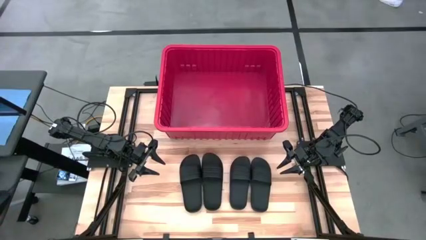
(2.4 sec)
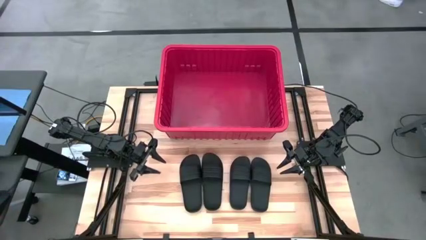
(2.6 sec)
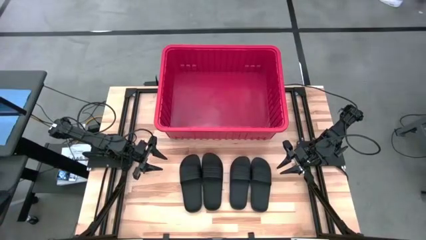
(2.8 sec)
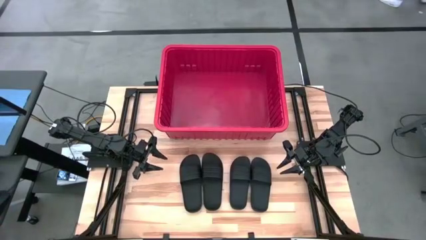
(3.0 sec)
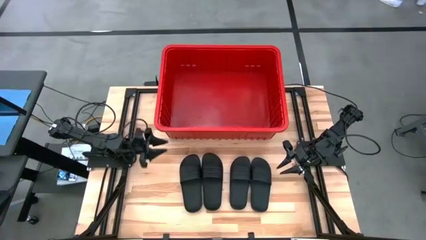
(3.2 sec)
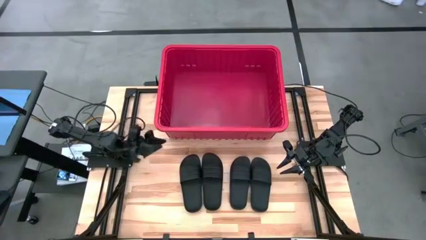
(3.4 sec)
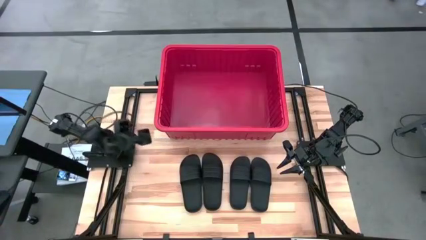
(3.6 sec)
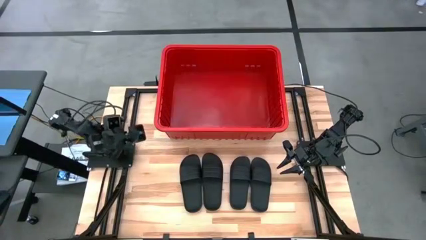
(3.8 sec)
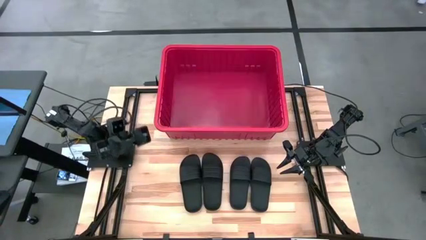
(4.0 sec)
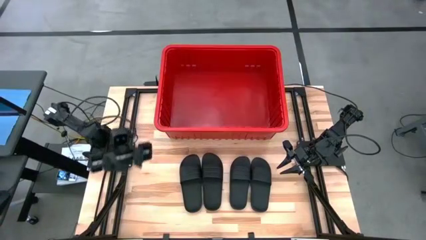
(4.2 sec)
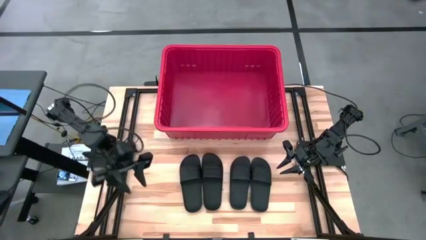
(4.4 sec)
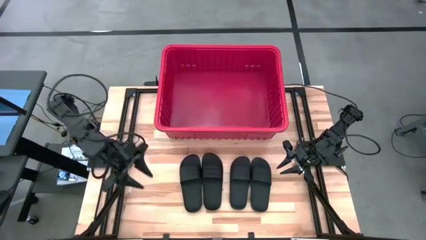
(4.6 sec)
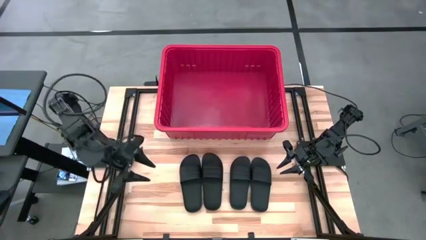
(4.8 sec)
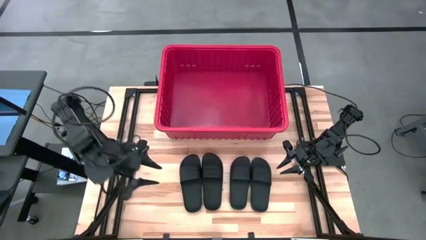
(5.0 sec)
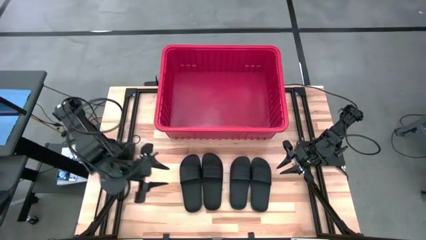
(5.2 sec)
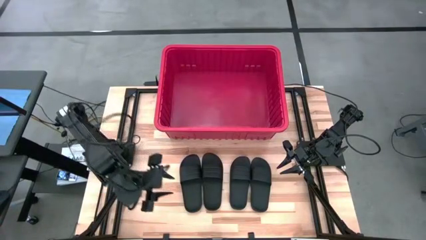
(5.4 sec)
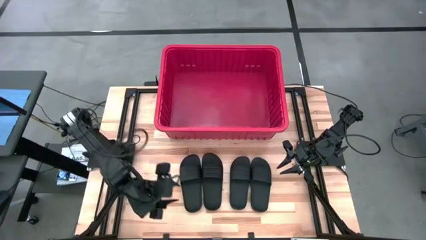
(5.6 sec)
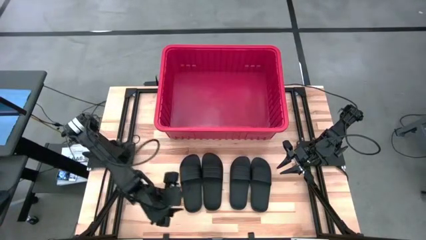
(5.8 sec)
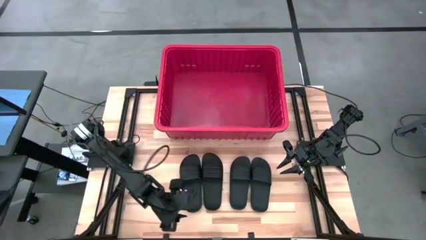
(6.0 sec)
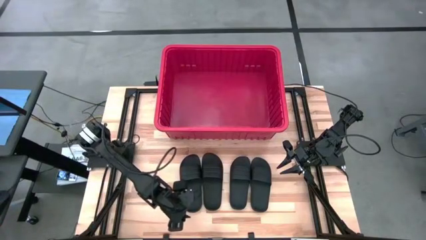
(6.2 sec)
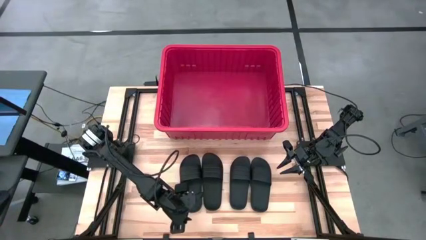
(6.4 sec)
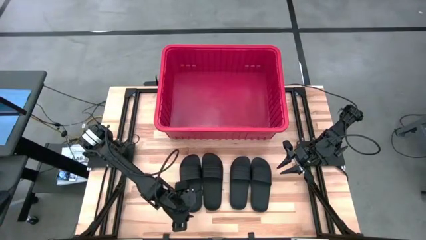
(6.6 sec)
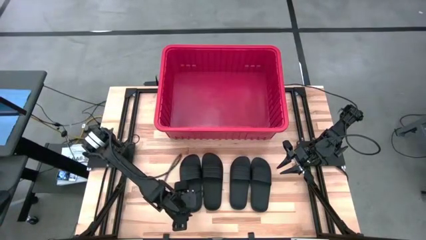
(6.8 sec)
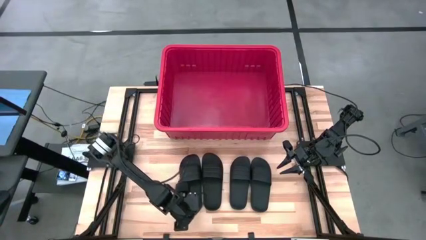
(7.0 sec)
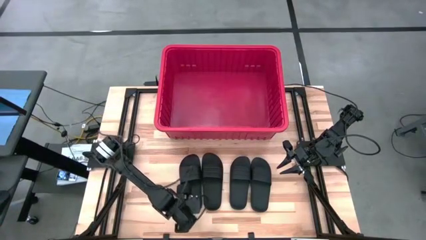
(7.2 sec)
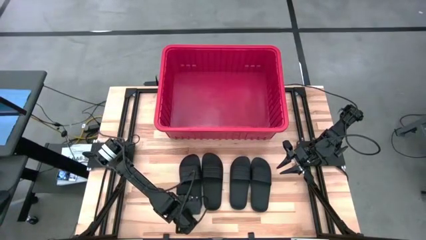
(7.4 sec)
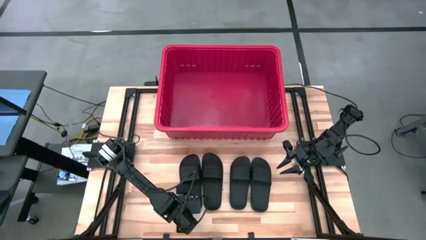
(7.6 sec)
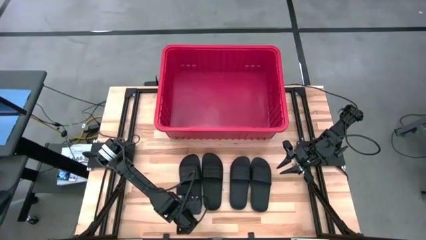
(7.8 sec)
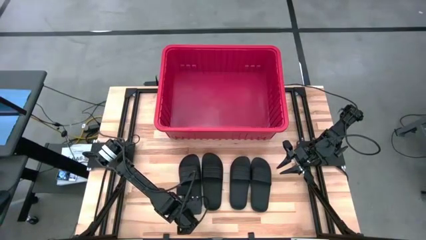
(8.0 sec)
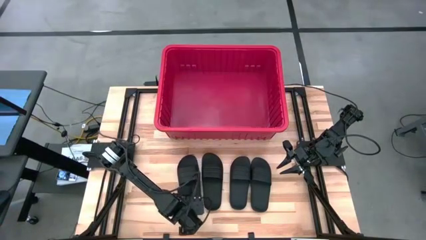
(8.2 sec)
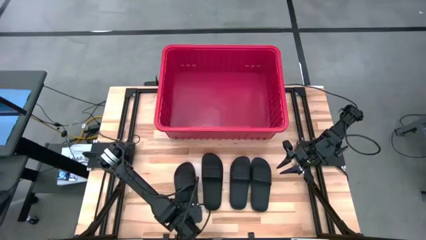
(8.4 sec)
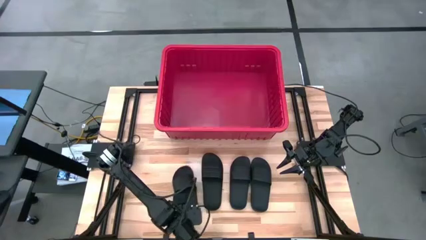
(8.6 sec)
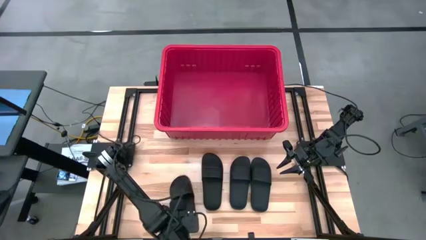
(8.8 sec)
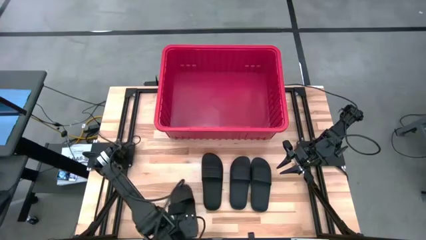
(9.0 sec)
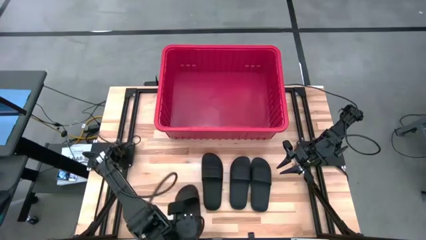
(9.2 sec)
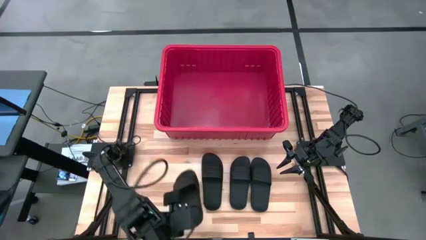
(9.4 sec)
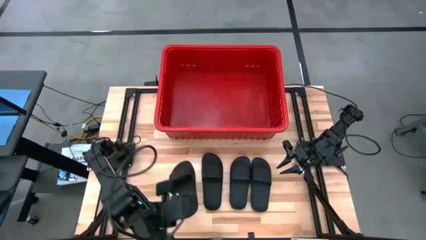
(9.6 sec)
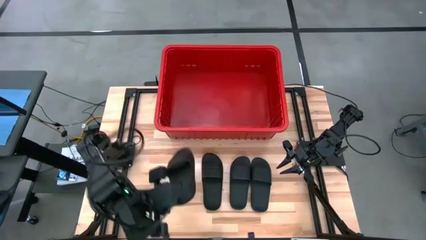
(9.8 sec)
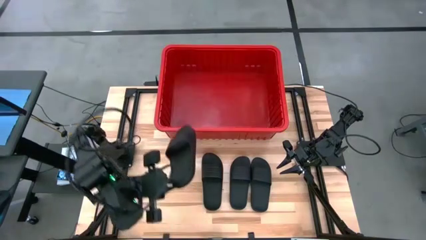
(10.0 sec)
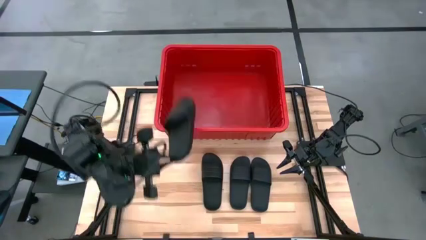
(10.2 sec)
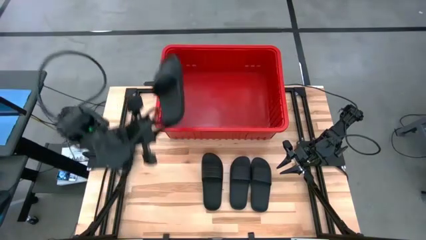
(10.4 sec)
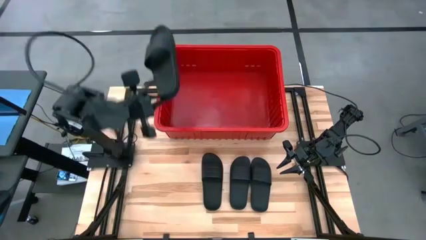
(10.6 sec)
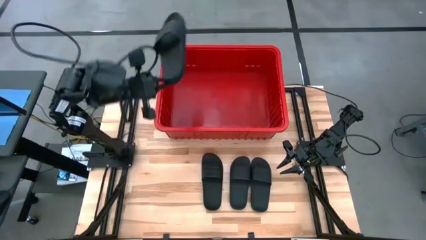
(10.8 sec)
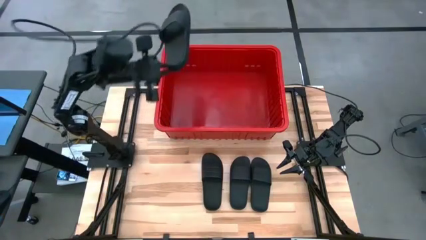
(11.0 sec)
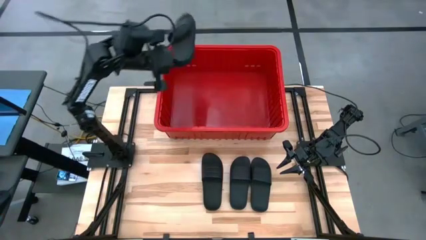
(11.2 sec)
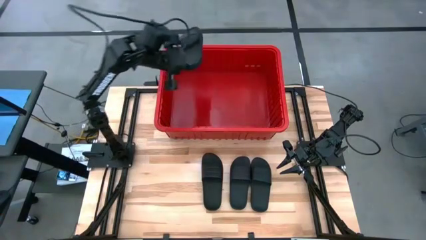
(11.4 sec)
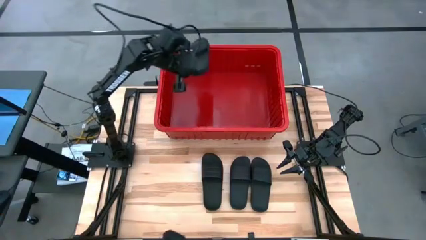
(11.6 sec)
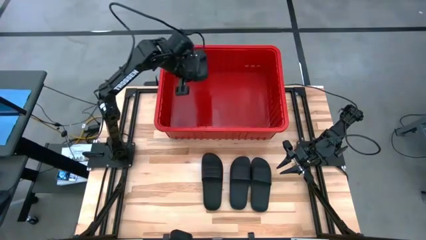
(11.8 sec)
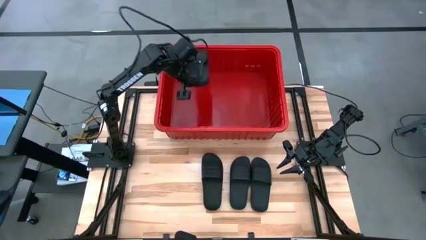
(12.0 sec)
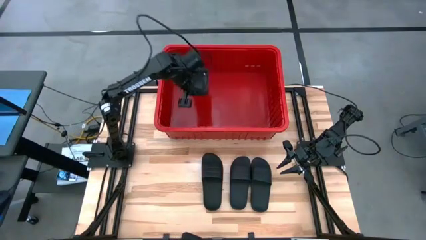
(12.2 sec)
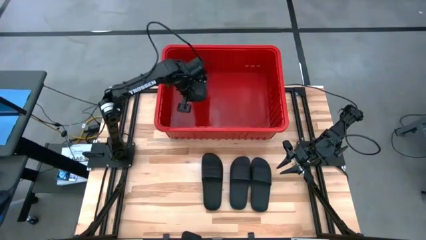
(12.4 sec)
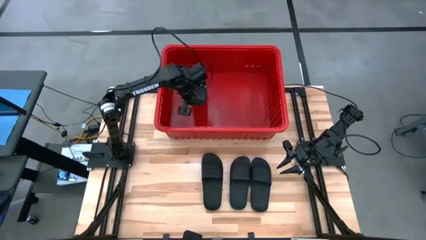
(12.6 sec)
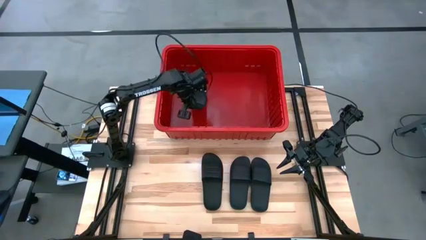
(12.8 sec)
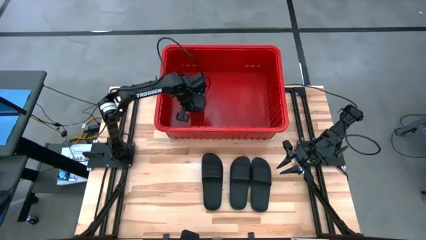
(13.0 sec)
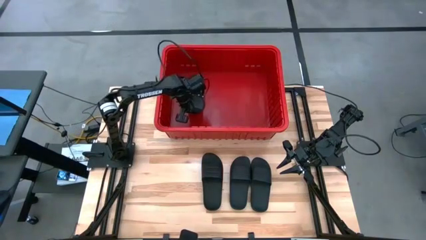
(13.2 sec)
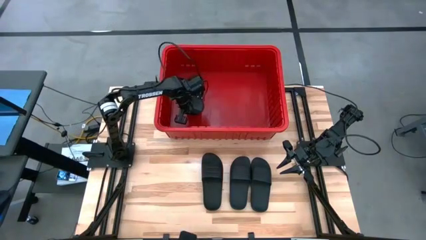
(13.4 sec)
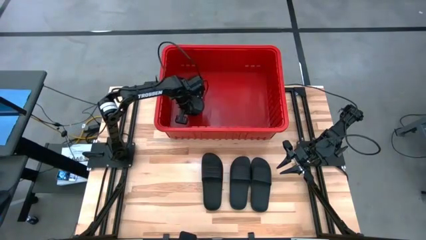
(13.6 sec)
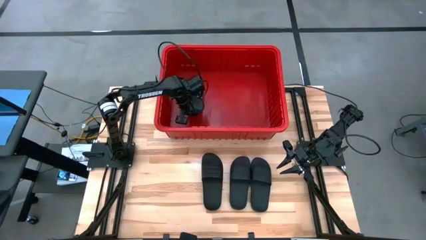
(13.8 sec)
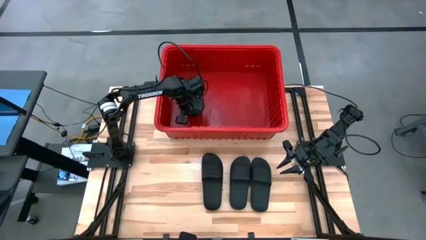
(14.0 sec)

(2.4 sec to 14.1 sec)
Task: Pick and place slides into bin
Put the black slide into the red container
